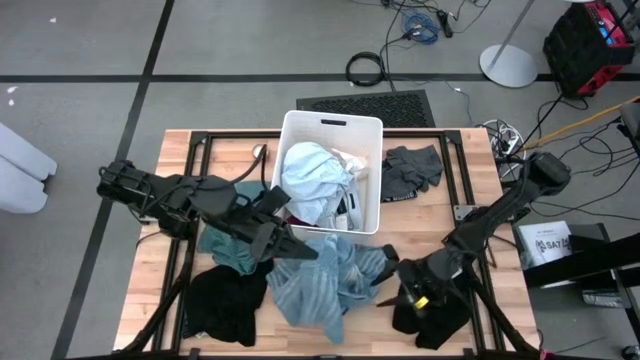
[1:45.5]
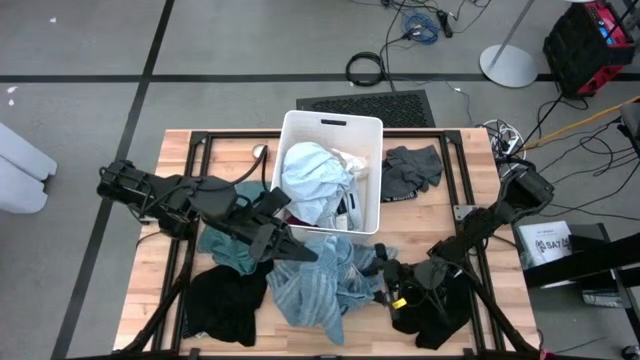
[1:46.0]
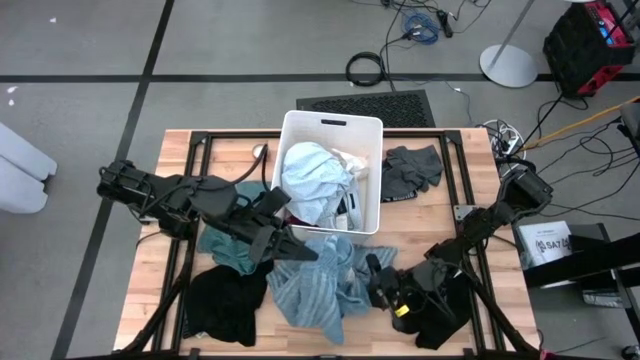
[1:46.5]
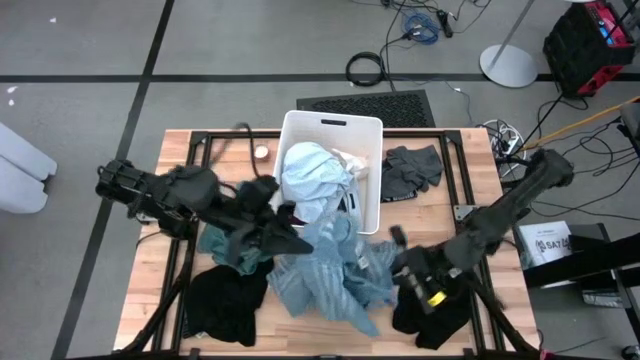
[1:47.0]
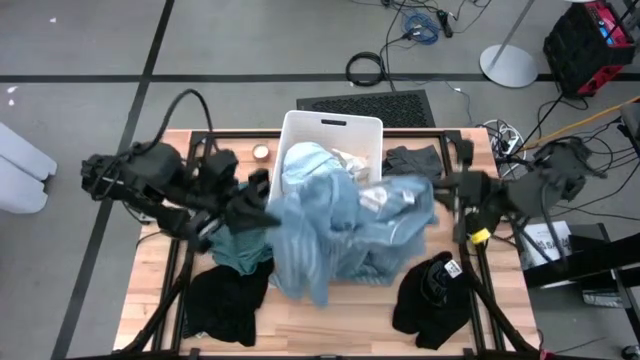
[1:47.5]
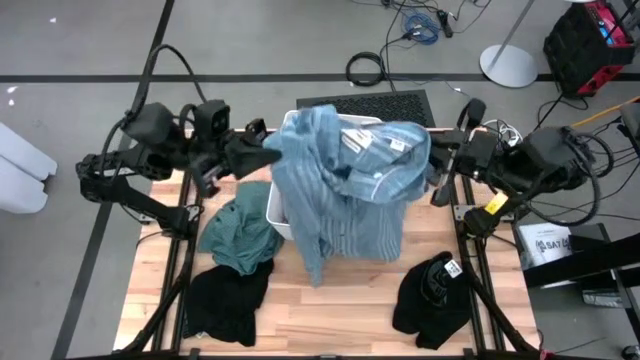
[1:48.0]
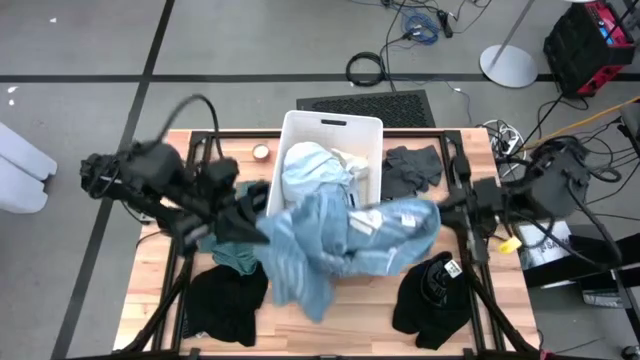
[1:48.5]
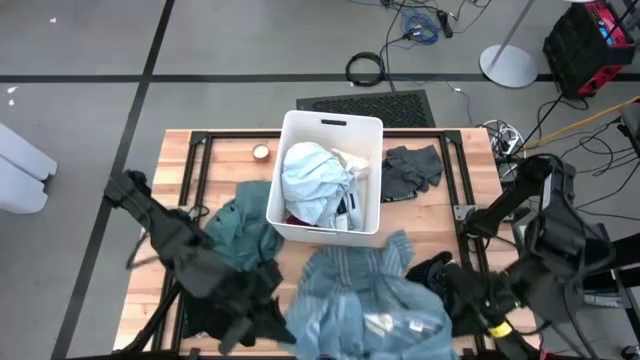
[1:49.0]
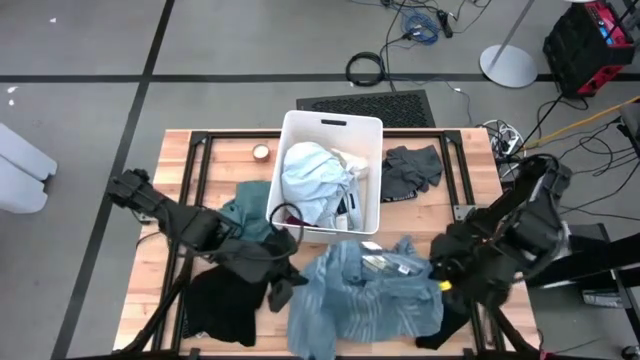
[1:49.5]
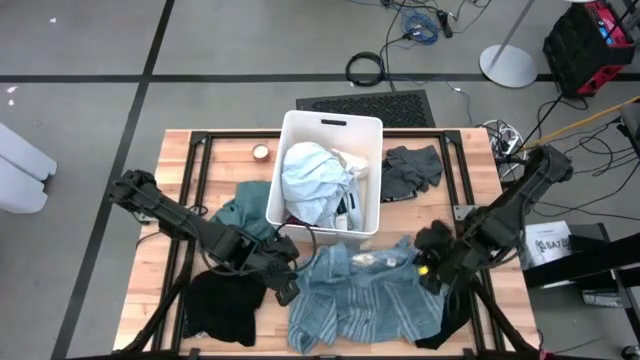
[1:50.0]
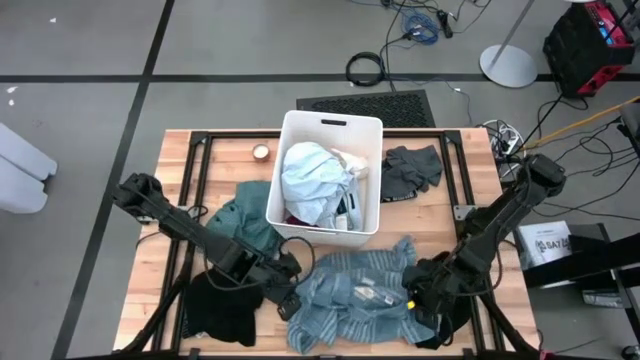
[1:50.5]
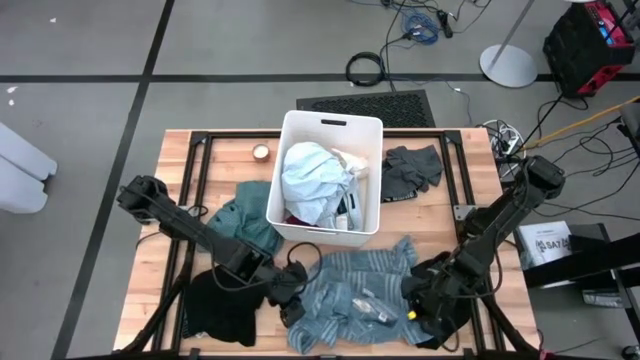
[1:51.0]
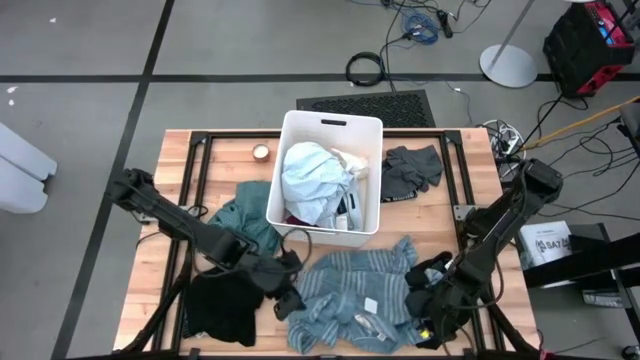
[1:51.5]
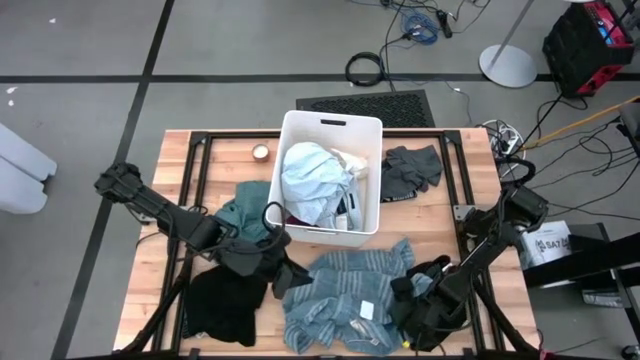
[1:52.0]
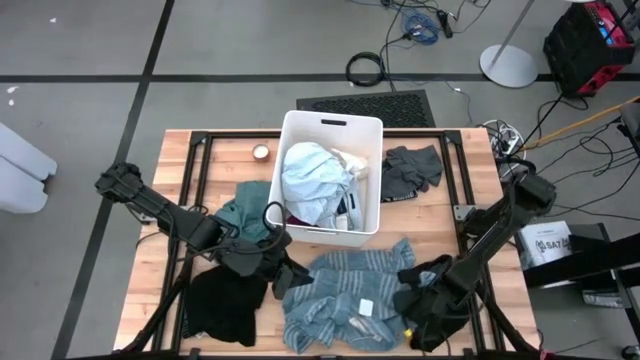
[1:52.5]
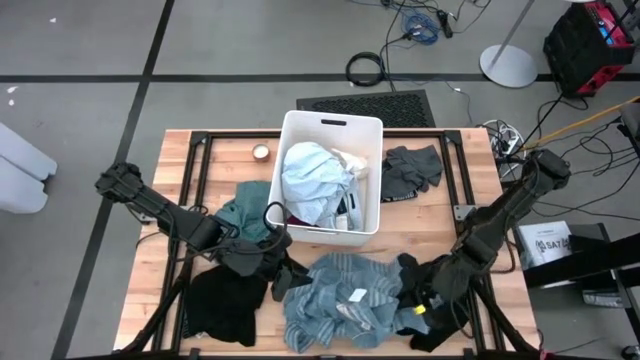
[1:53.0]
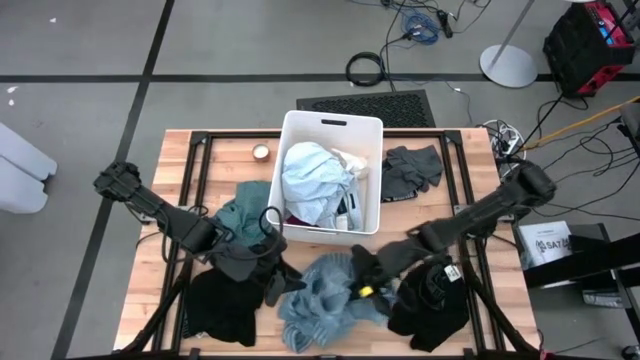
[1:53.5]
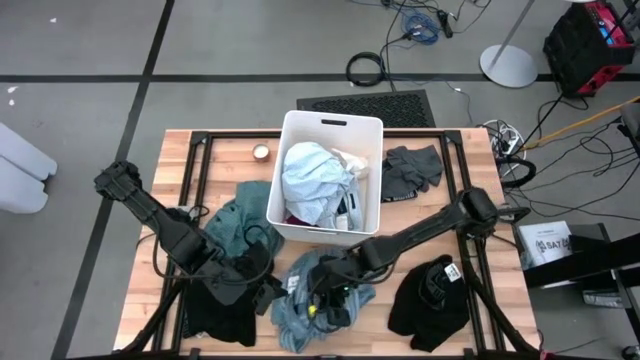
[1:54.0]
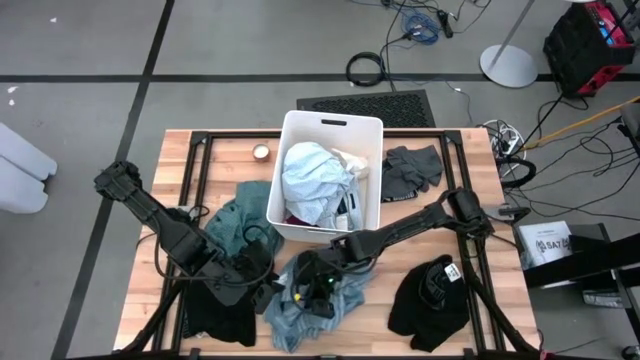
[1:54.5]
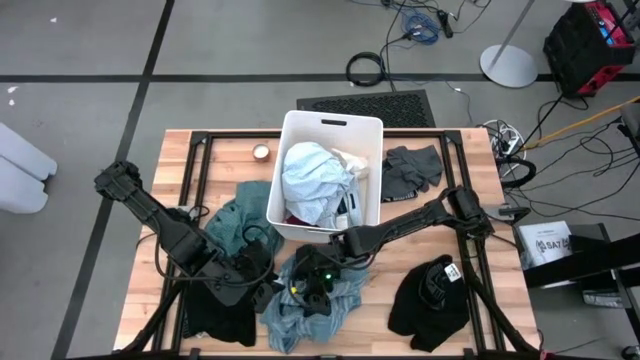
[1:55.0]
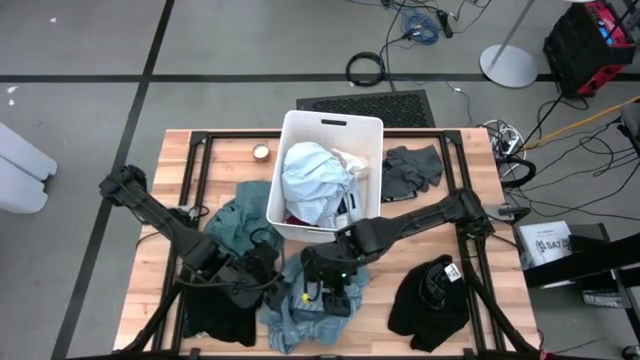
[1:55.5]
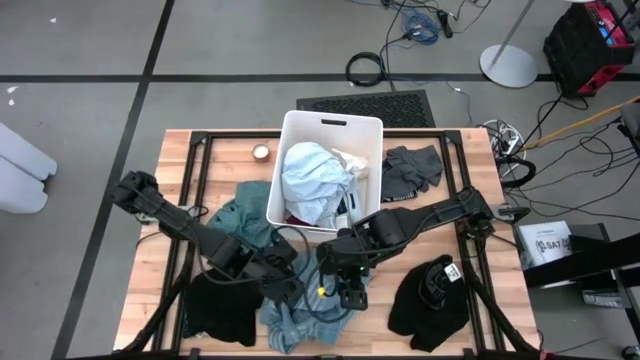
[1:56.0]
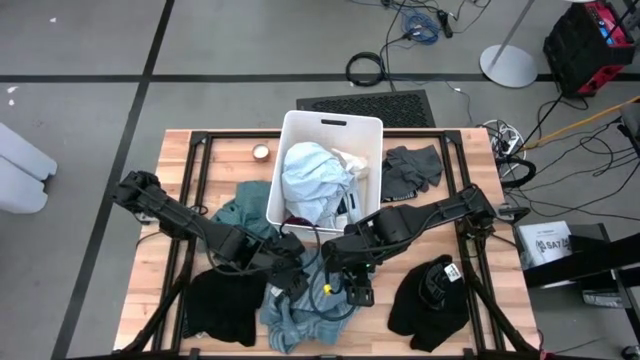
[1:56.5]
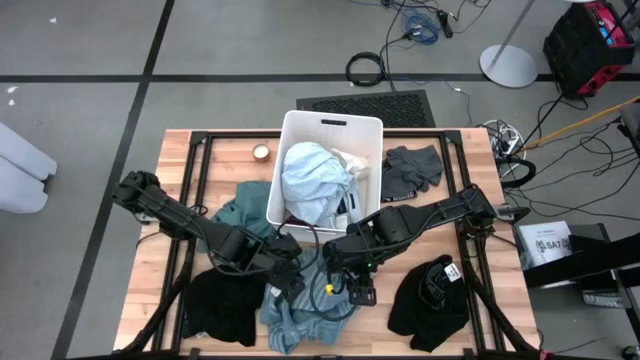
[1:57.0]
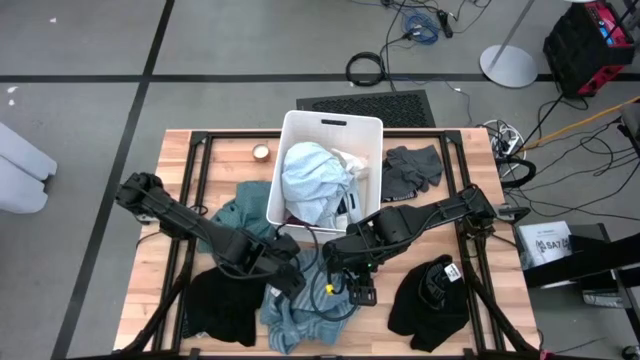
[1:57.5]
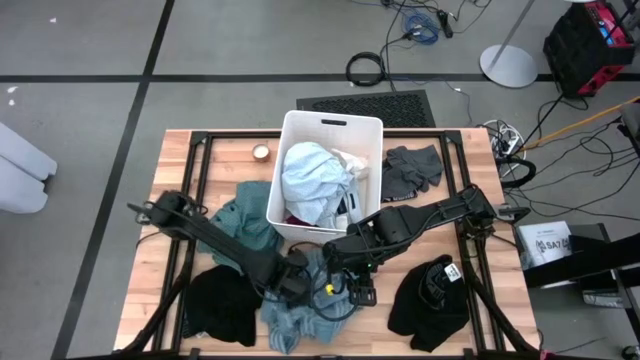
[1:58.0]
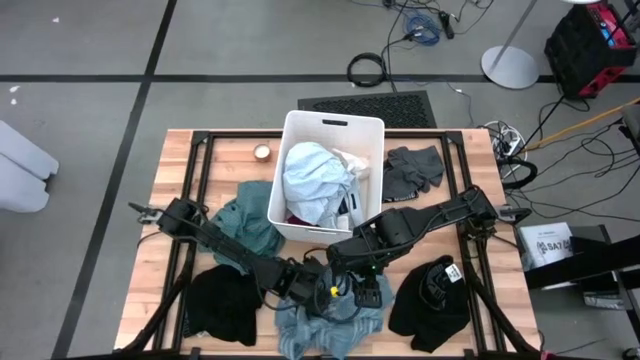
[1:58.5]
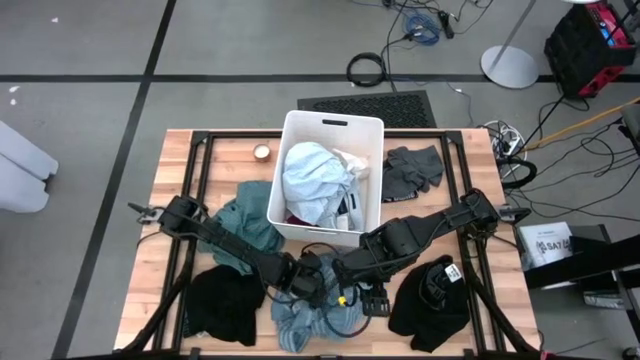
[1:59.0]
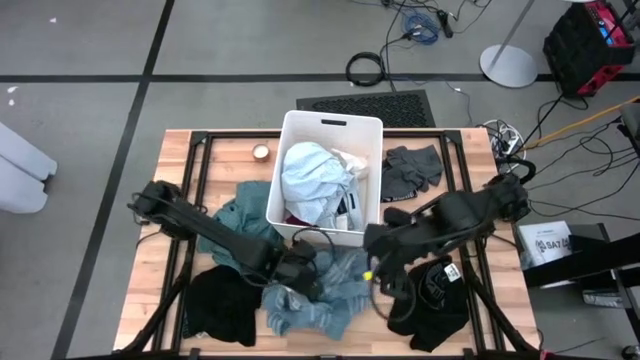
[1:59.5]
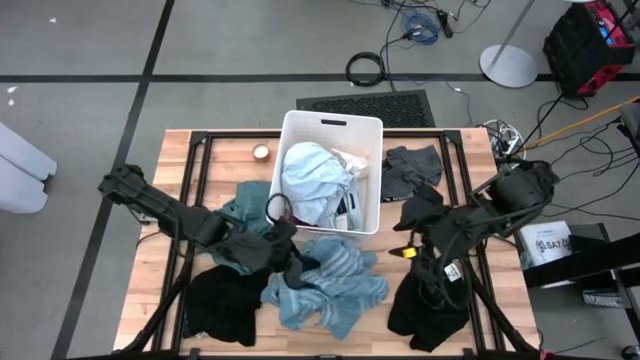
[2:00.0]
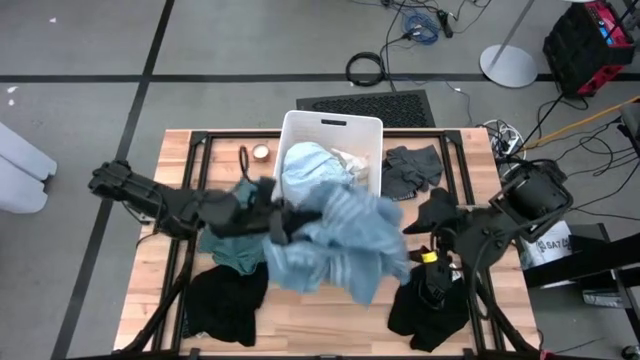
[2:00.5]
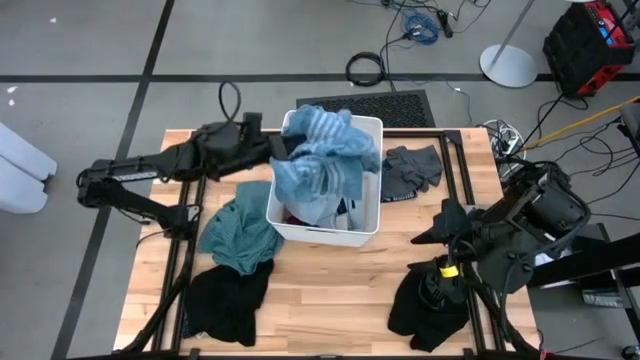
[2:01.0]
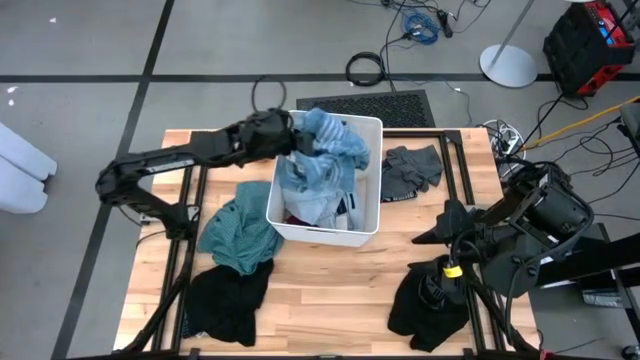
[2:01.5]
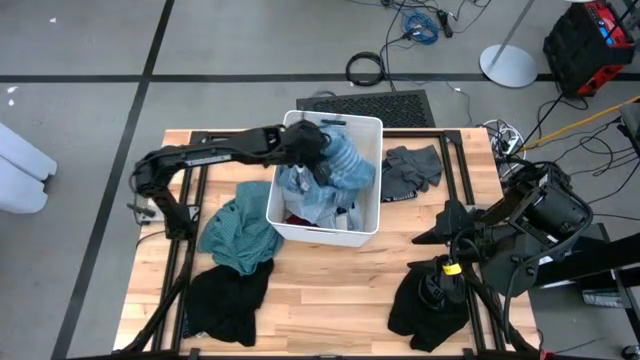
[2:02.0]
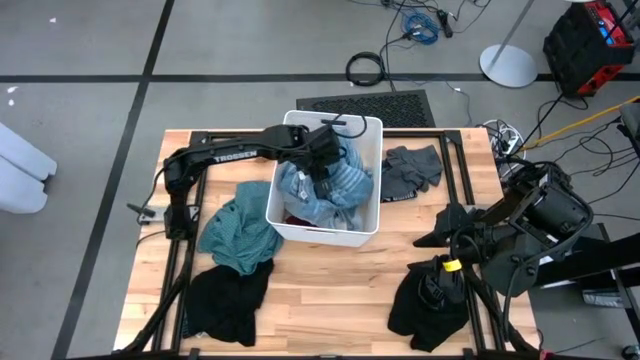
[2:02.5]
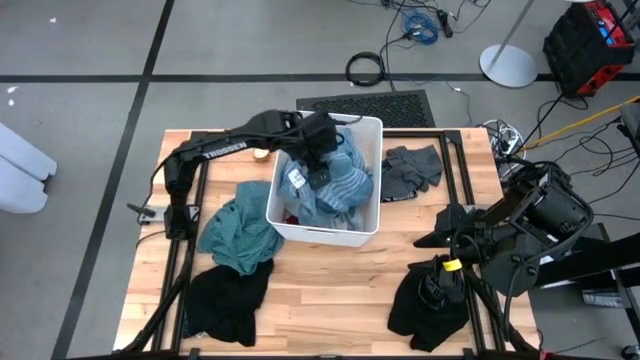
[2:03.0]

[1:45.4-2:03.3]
Task: Sort clothes
Put the blue polo shirt into the white laundry bin

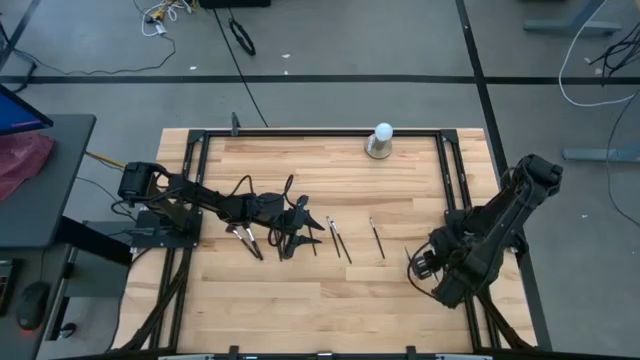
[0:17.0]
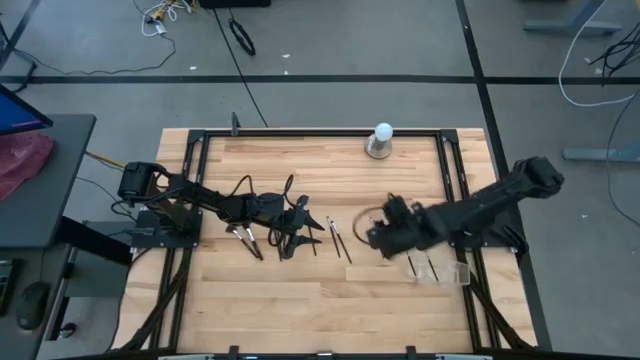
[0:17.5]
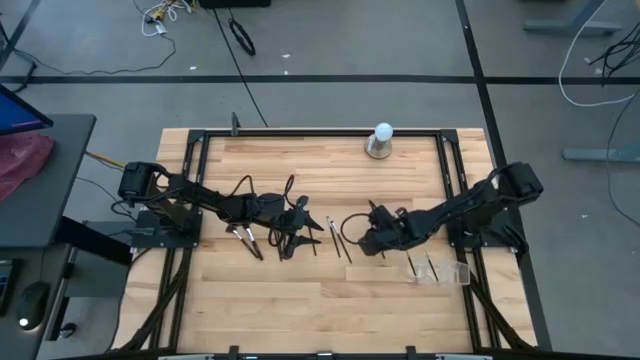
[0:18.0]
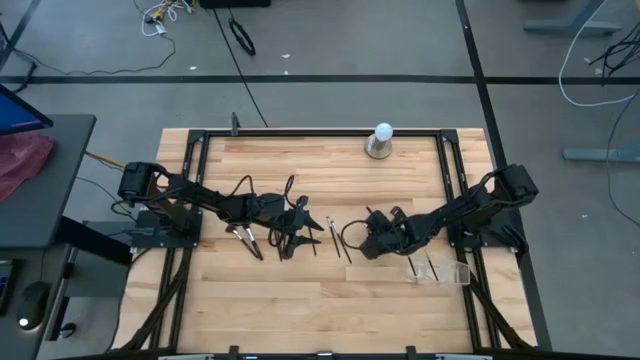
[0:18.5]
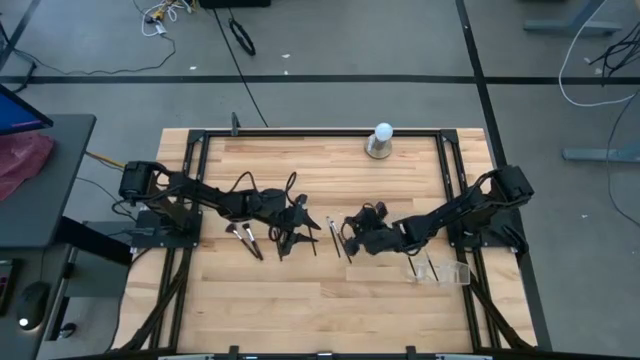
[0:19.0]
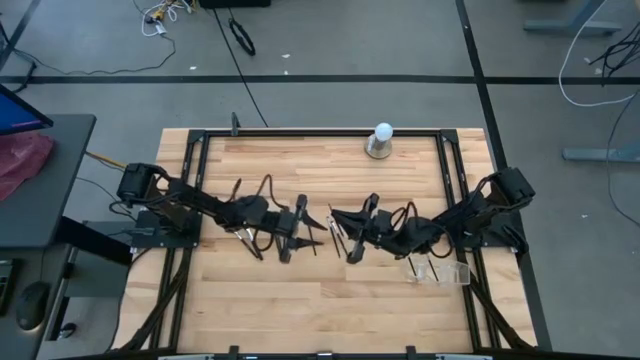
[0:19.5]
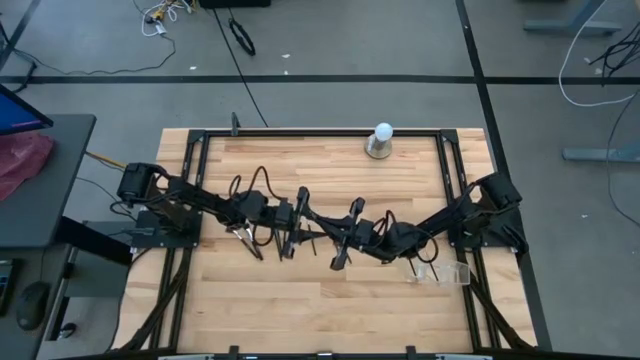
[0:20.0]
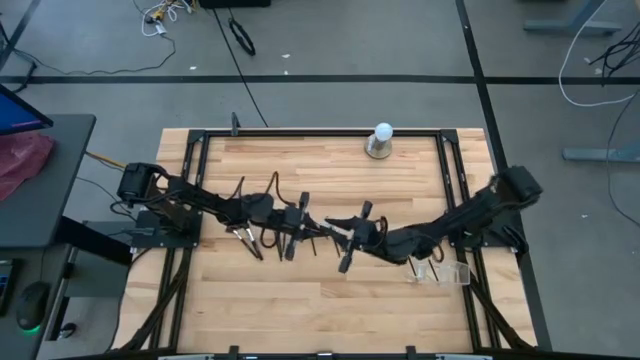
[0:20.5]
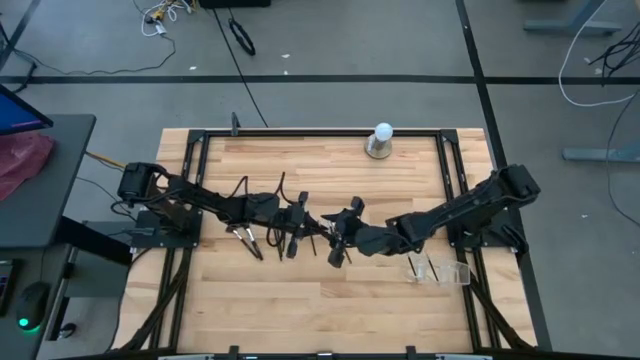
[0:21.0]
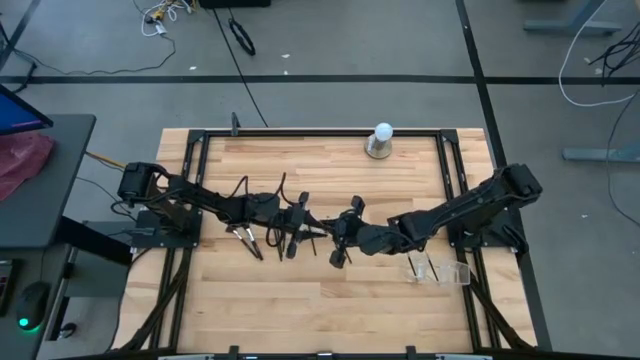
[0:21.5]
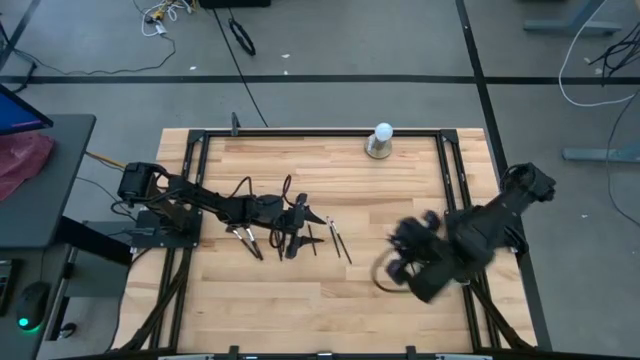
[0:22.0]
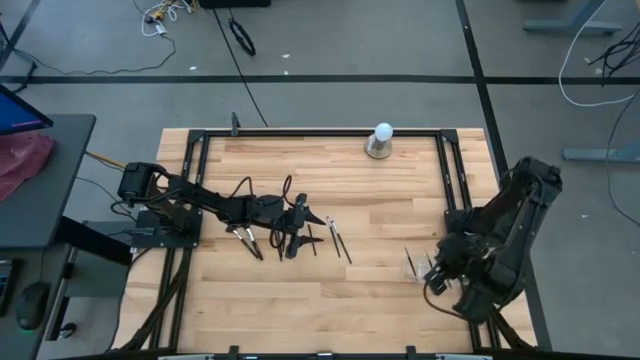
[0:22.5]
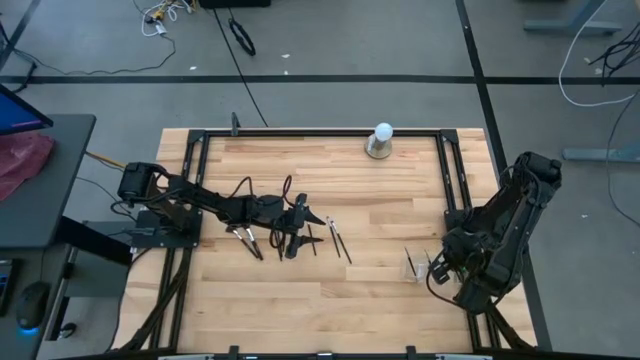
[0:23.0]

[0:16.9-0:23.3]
Task: Put items in baskets/containers
Put the black eyeshadow brush into the transparent organizer
